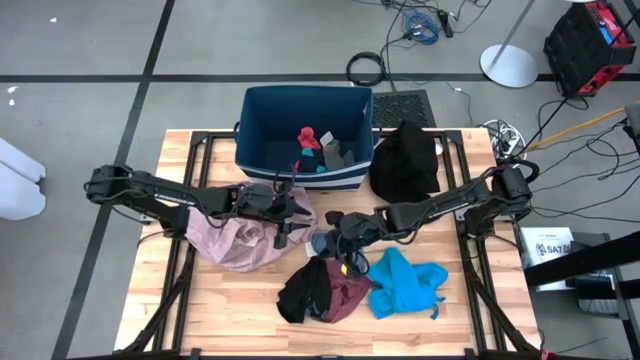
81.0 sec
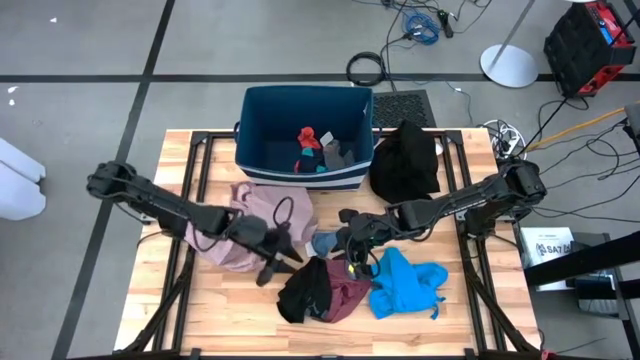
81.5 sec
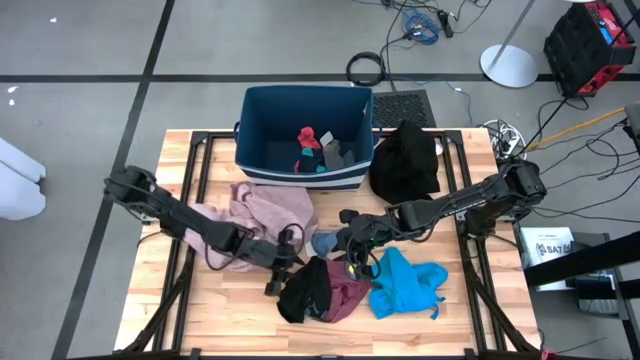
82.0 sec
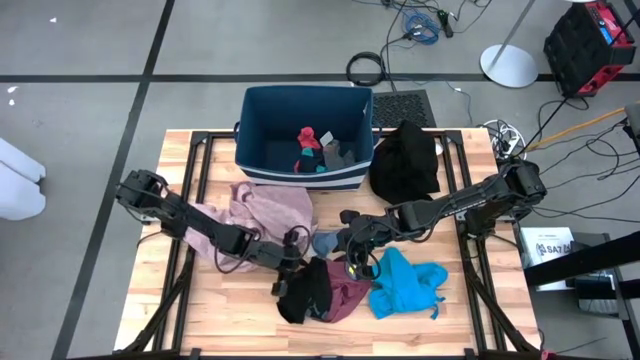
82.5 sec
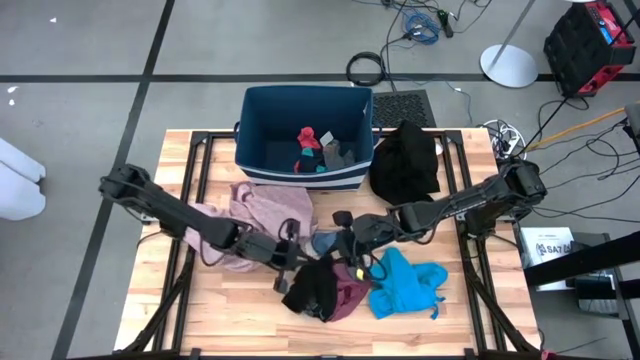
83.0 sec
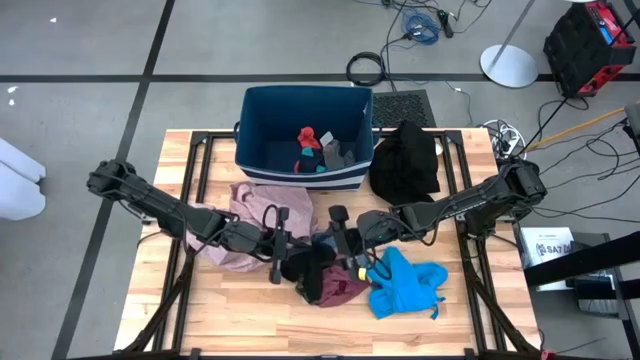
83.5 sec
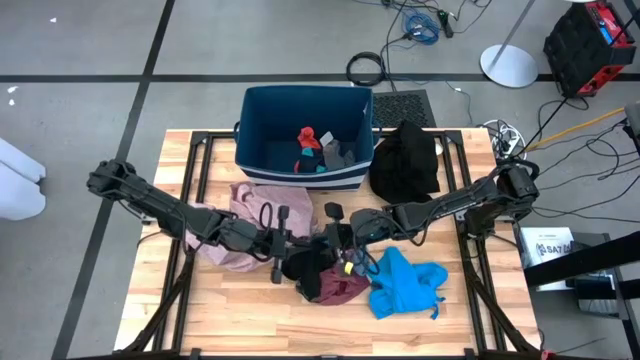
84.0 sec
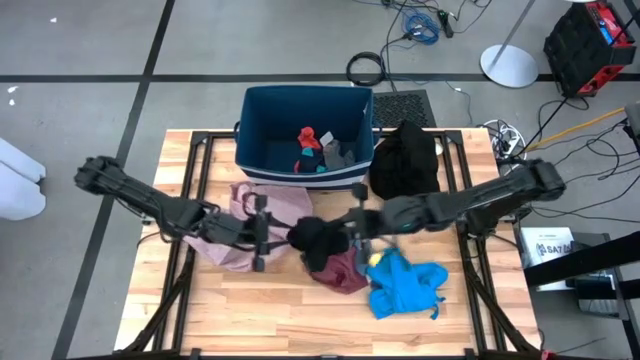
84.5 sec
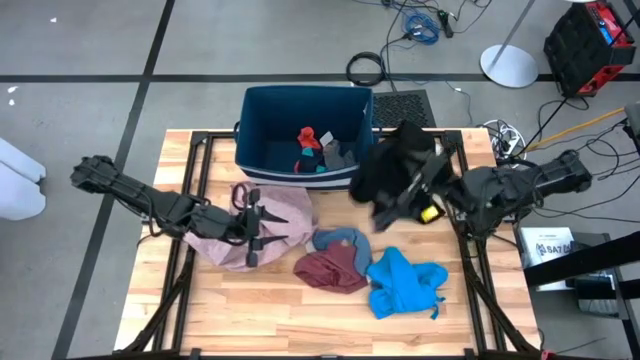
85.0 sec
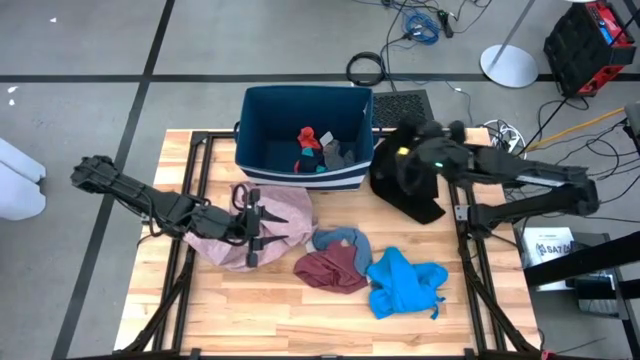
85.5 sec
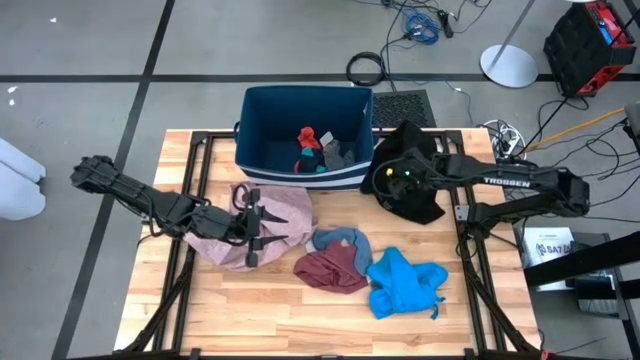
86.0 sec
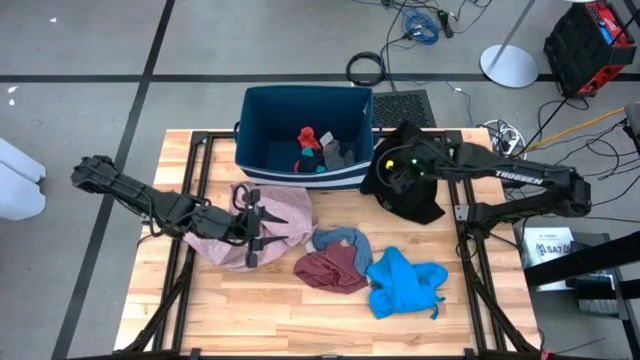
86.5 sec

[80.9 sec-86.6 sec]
Task: Sort clothes
Move the black boxer to the top right of the table

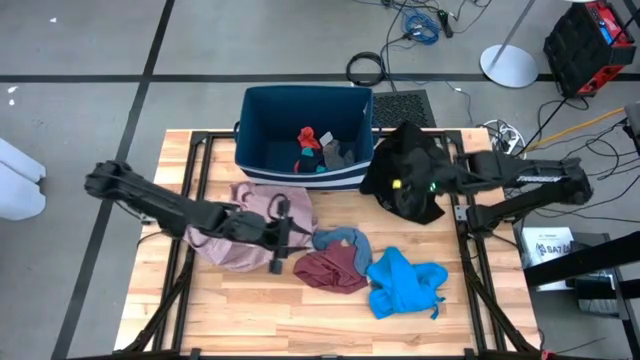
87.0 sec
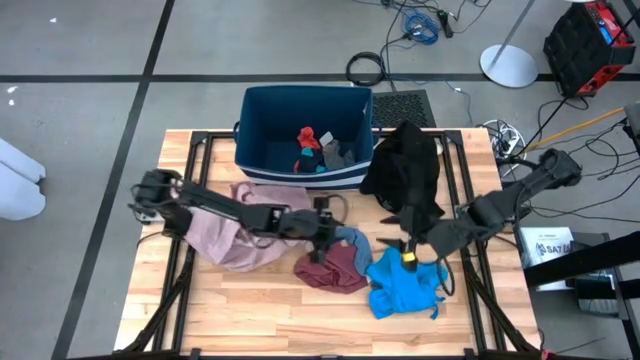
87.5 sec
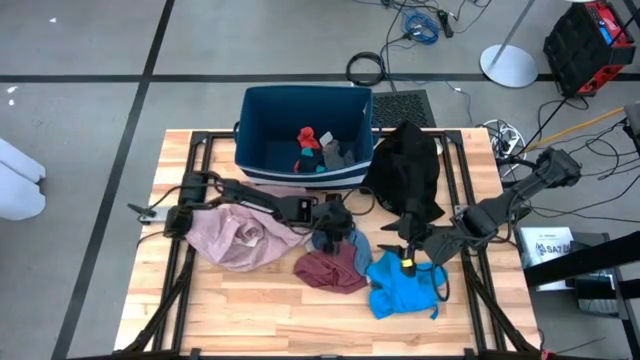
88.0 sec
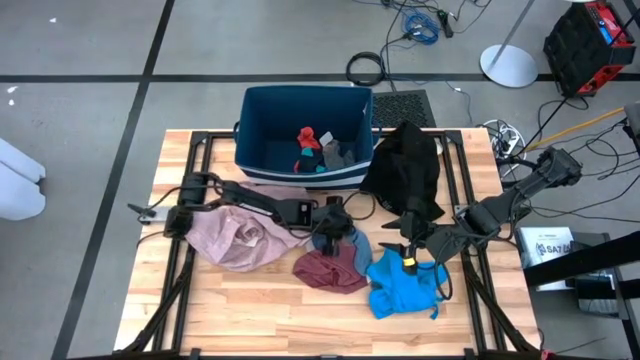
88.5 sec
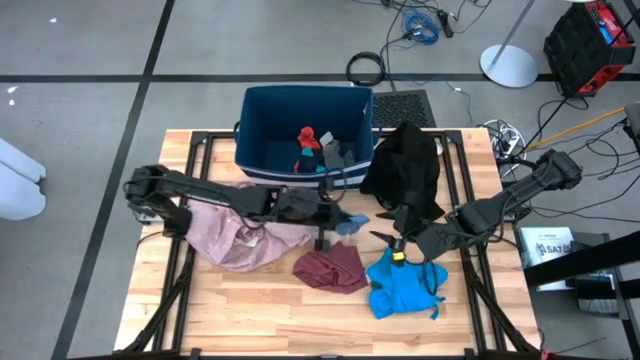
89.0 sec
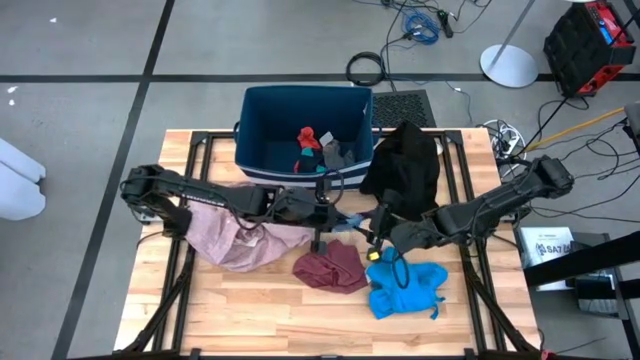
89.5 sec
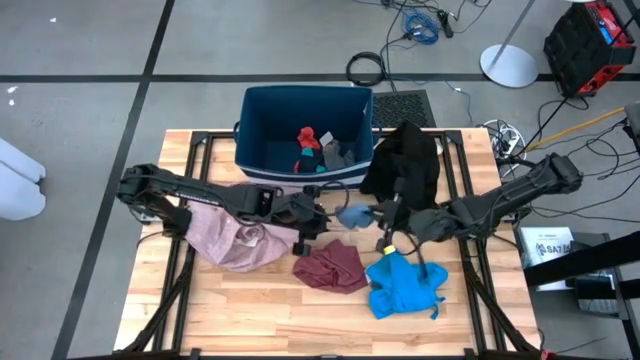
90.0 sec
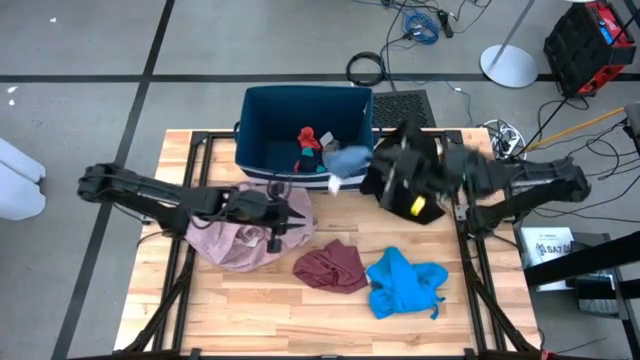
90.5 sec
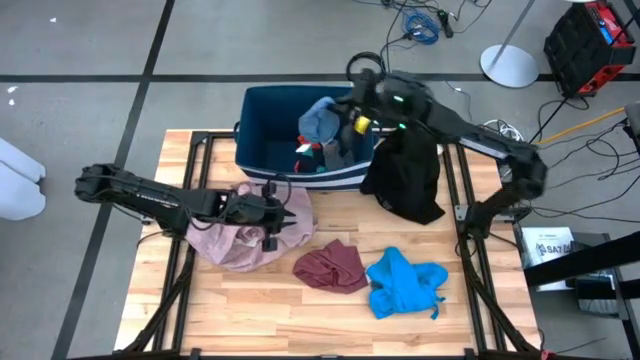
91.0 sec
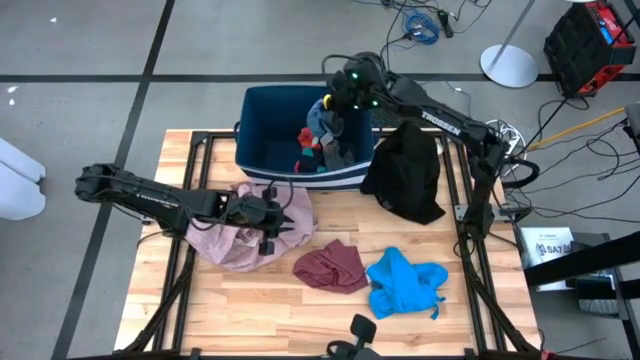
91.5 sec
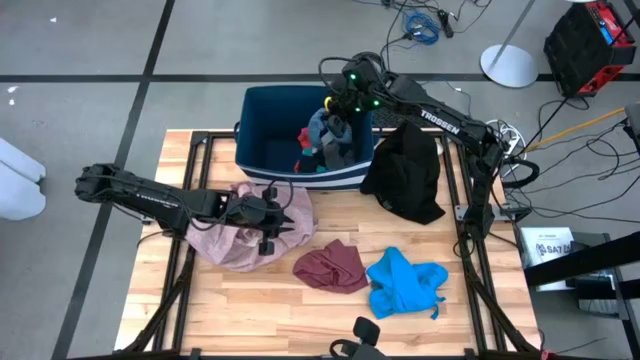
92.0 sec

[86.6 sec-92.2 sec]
Put the gray sock into the blue laundry organizer

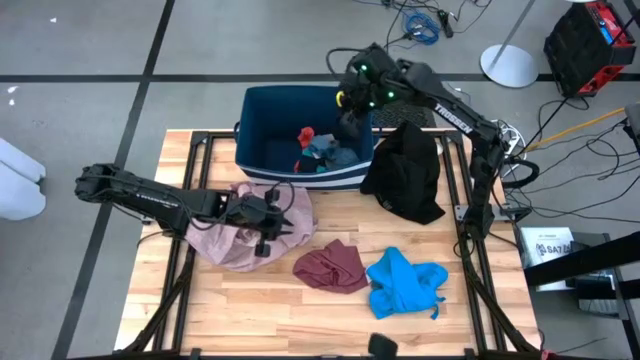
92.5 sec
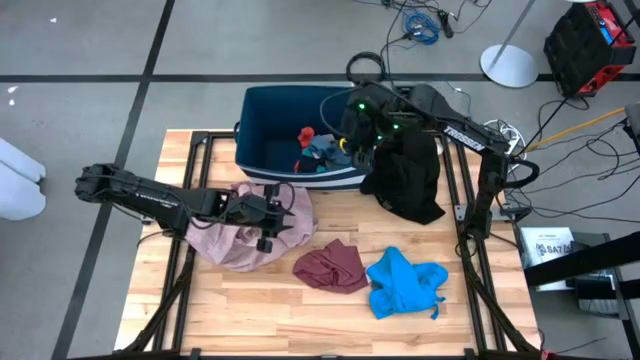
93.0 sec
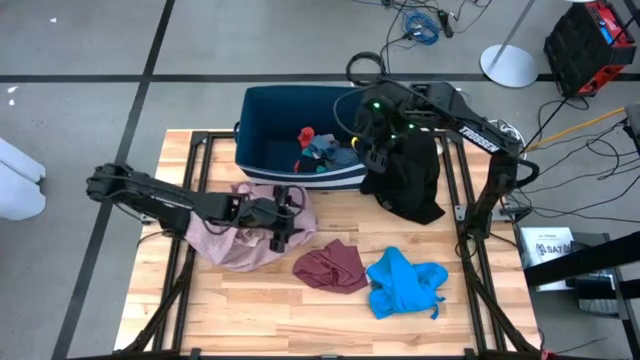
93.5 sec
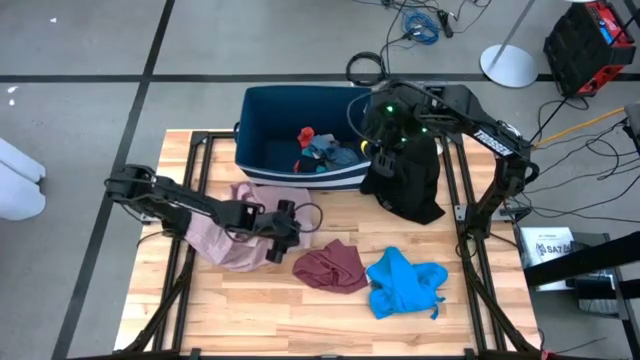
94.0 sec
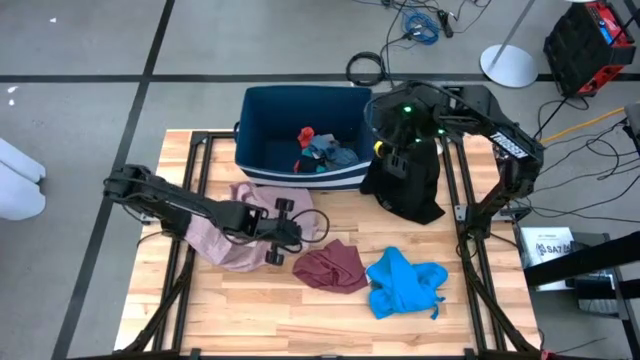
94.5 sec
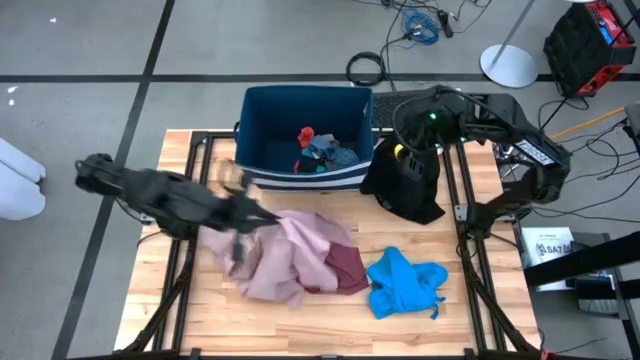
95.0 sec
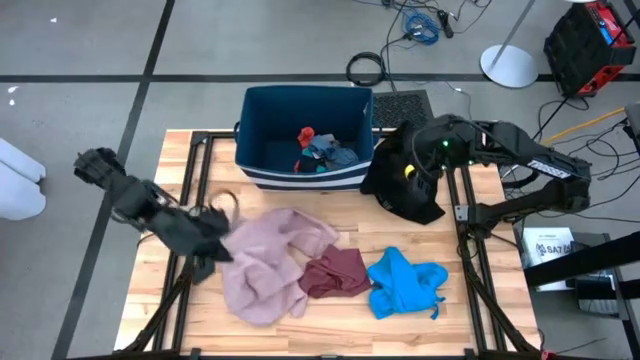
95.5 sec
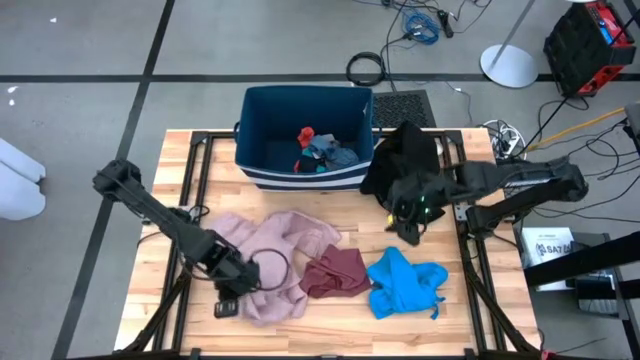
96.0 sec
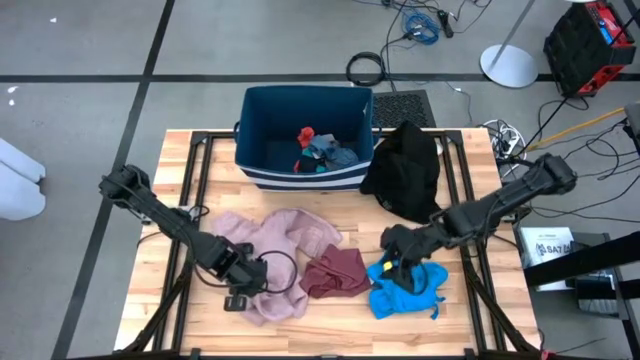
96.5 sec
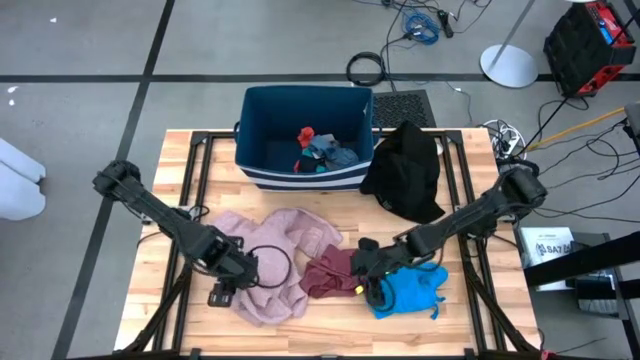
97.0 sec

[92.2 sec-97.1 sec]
Adjust the pink polo shirt on the table

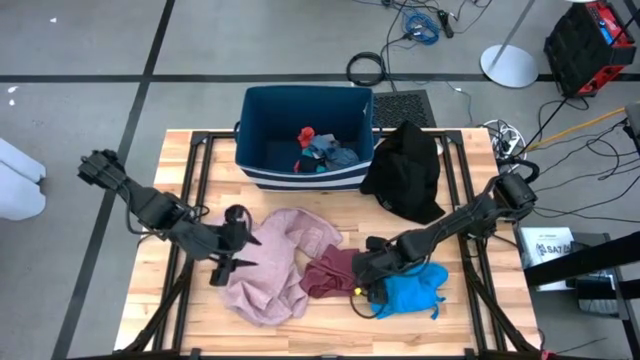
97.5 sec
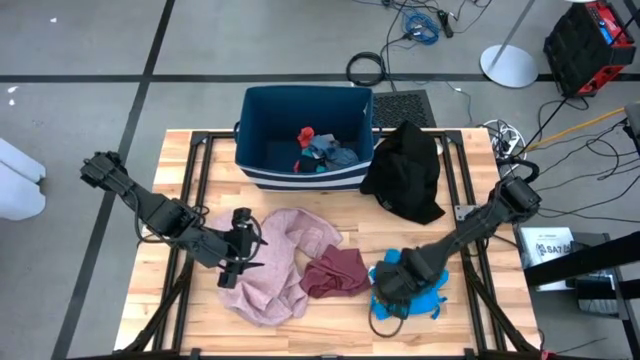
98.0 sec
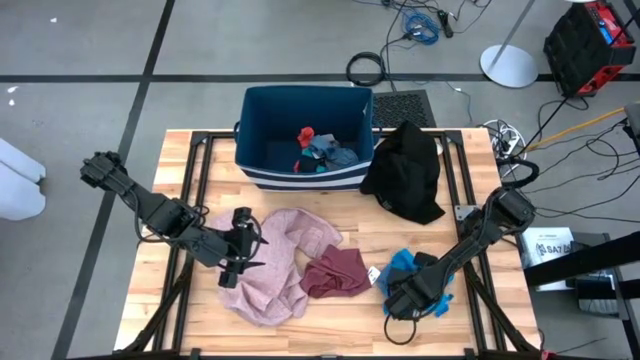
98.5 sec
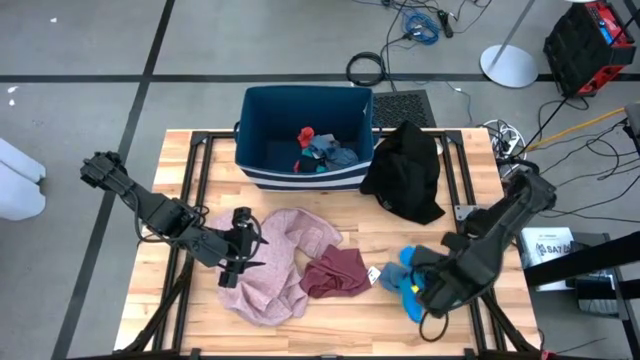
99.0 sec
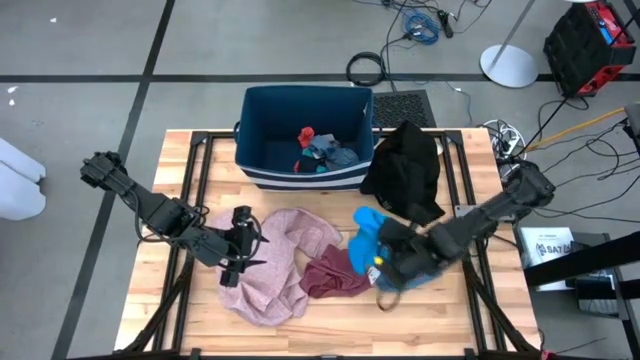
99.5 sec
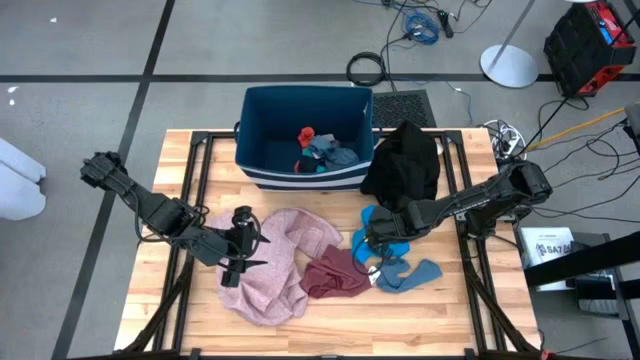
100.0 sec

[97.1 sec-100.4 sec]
Move the blue short to the center of the table

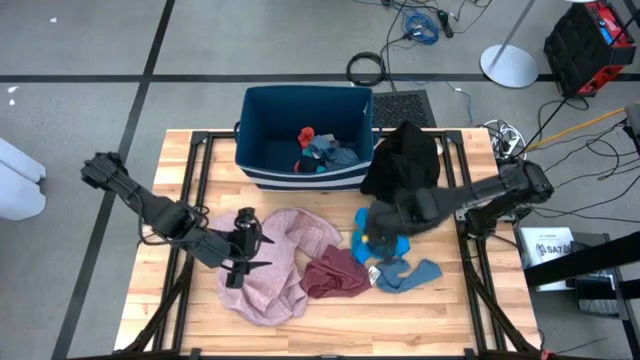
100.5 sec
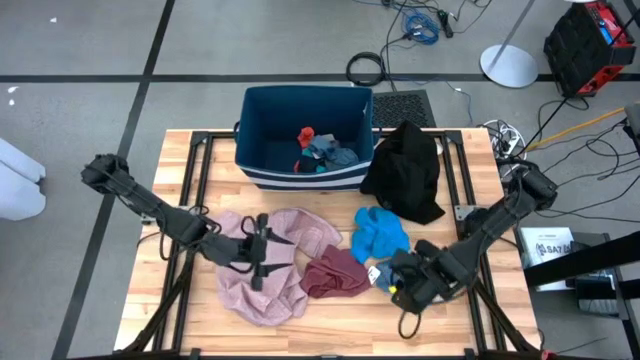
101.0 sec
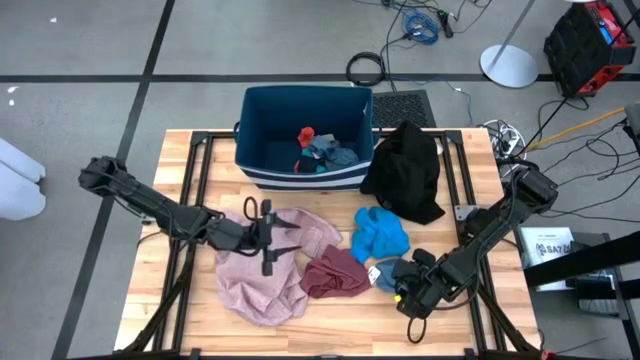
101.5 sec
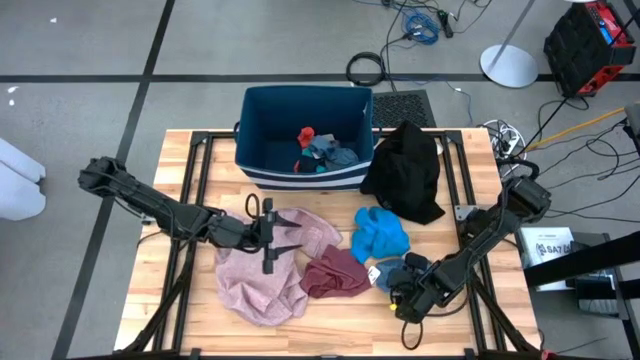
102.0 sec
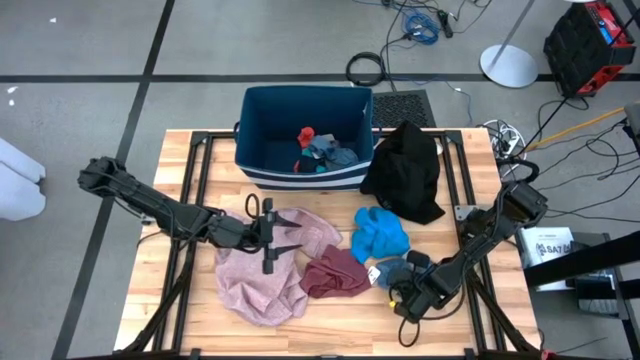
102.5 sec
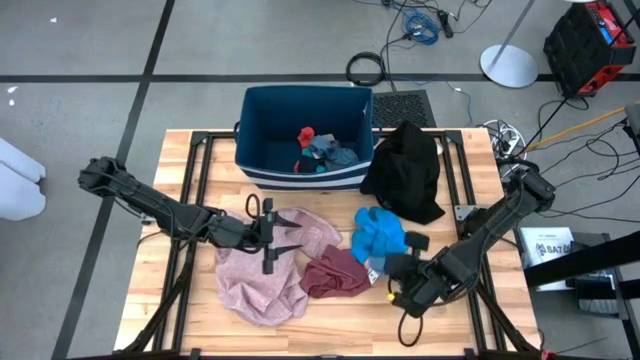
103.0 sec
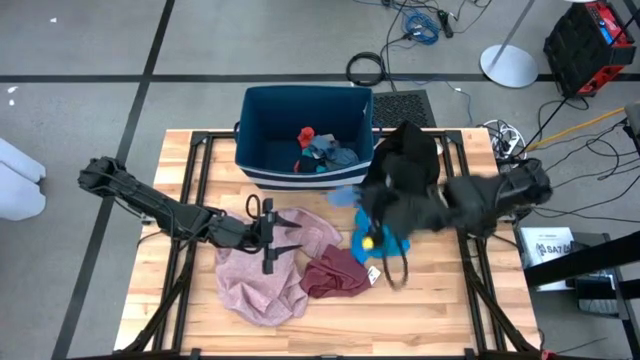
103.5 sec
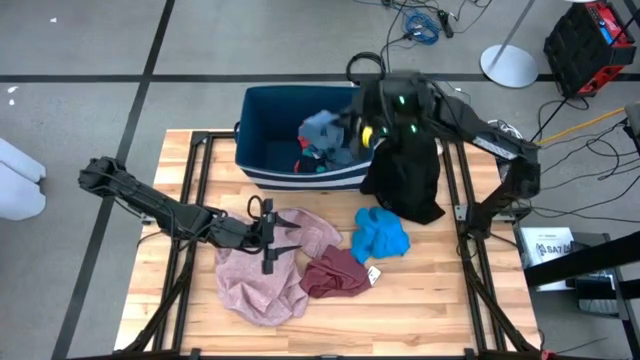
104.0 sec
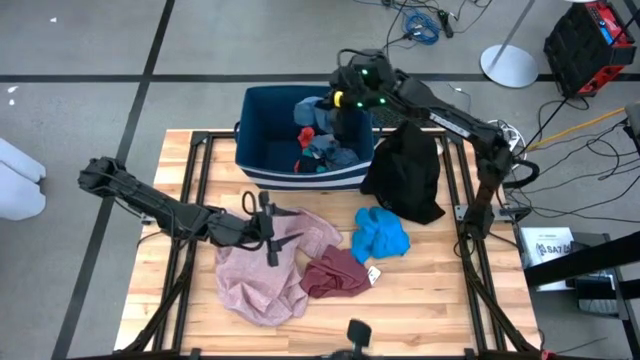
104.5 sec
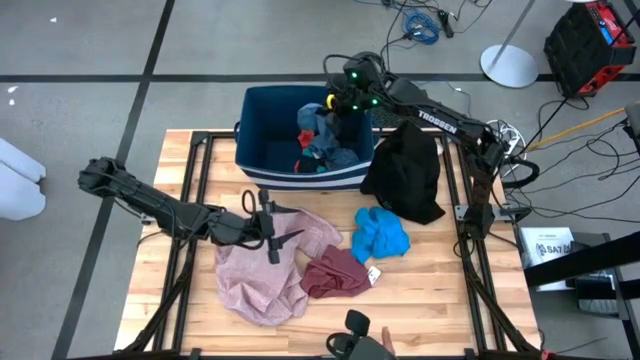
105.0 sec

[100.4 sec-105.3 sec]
Put the gray sock into the blue laundry organizer
